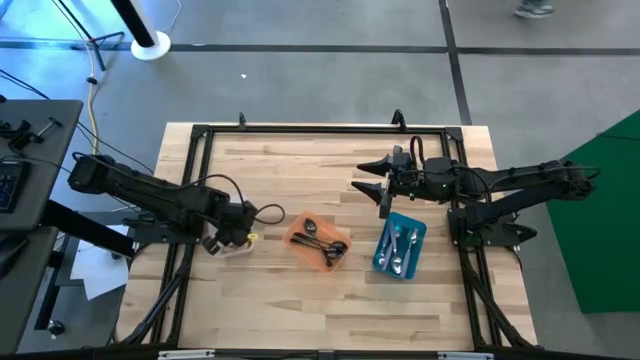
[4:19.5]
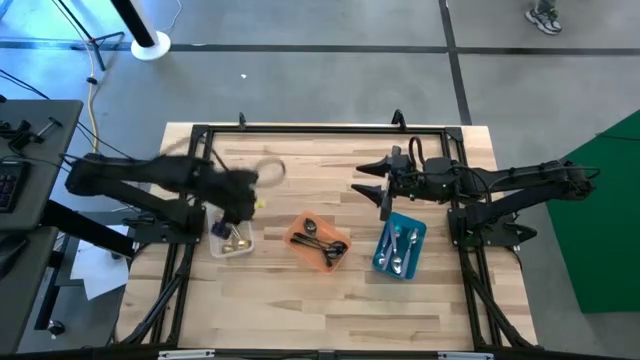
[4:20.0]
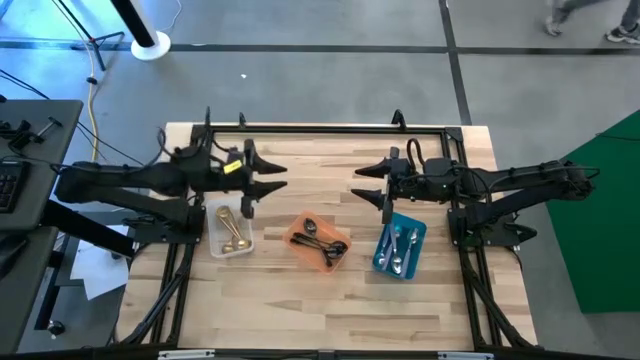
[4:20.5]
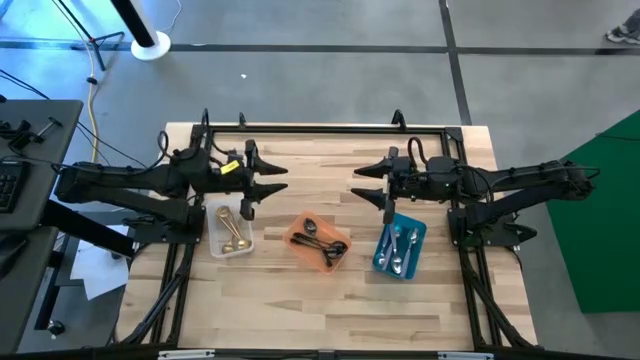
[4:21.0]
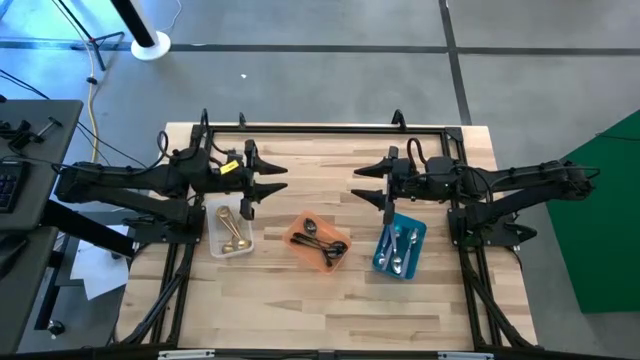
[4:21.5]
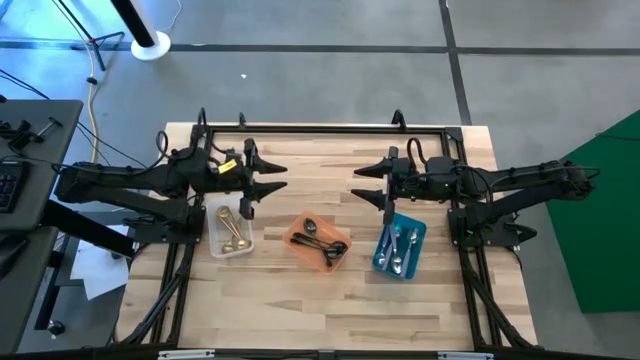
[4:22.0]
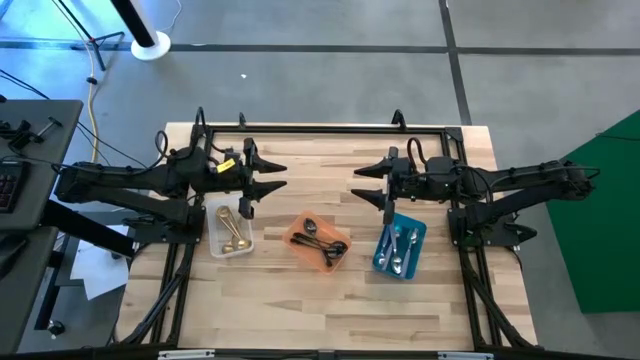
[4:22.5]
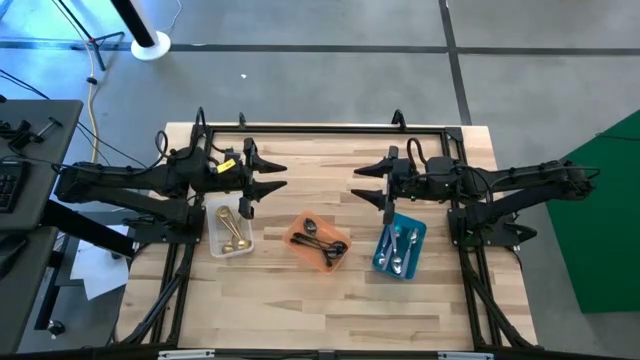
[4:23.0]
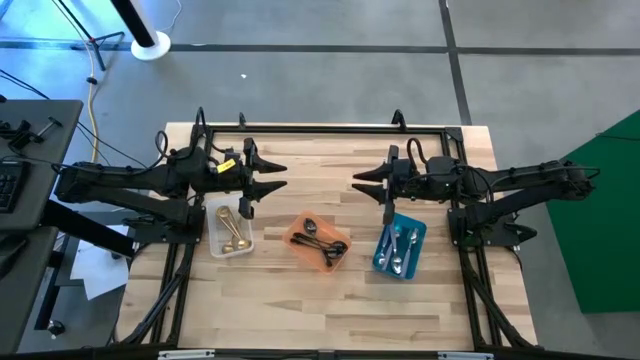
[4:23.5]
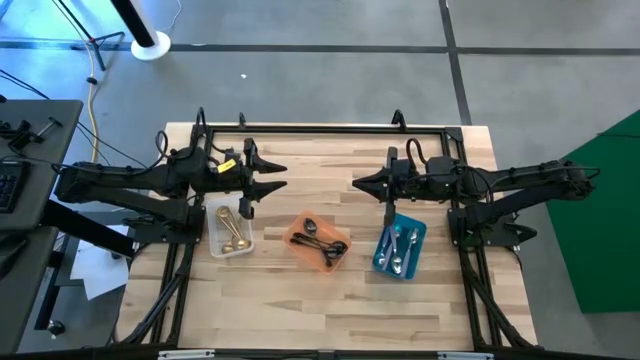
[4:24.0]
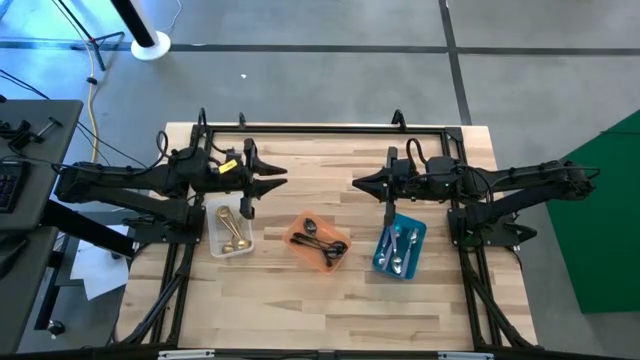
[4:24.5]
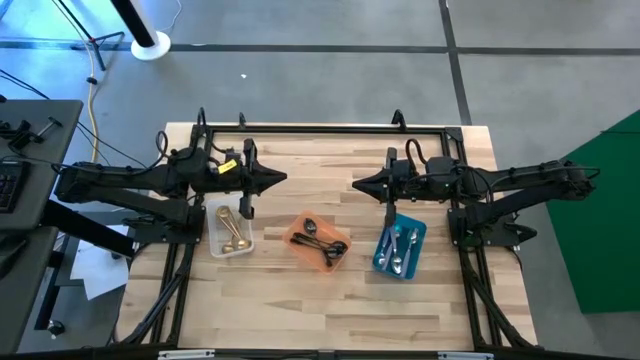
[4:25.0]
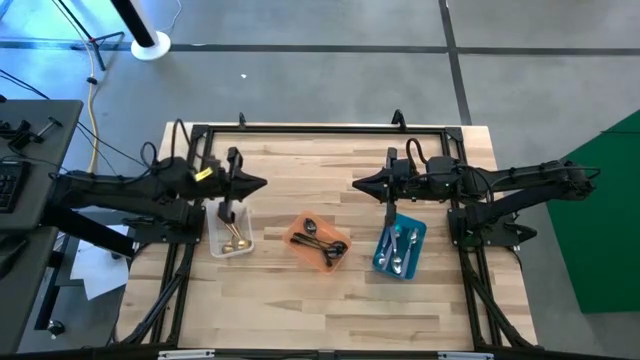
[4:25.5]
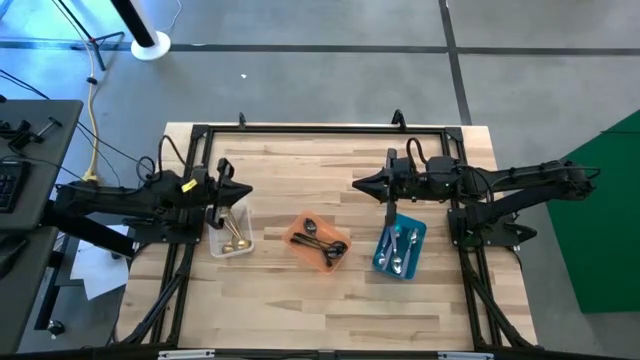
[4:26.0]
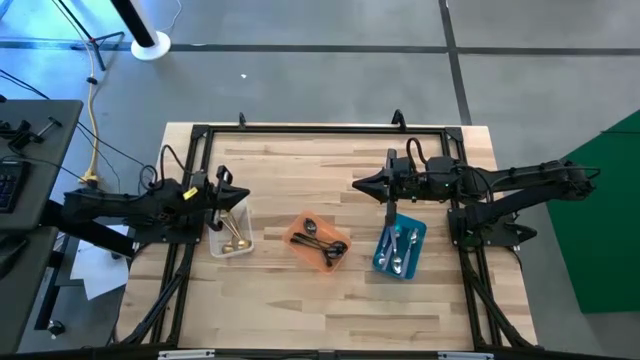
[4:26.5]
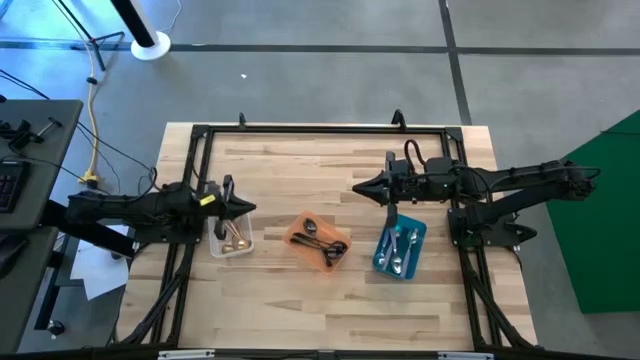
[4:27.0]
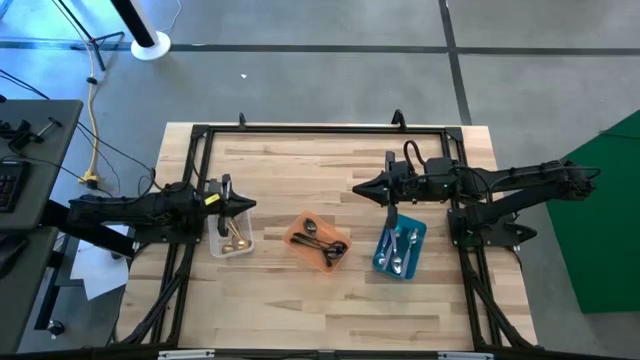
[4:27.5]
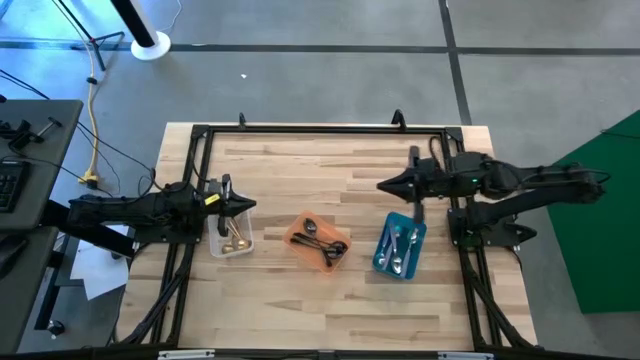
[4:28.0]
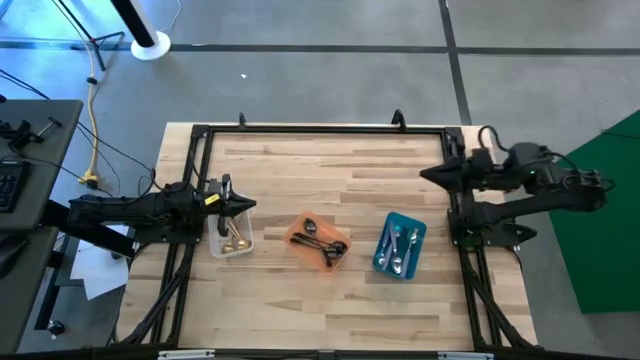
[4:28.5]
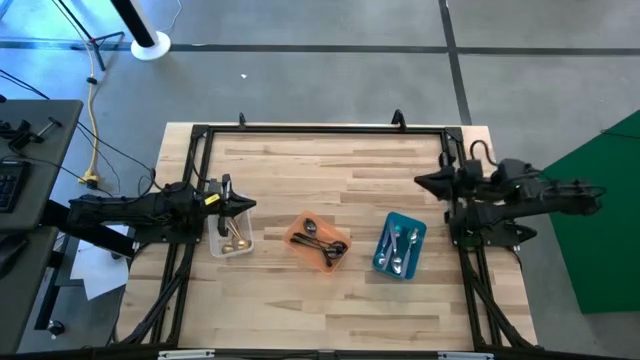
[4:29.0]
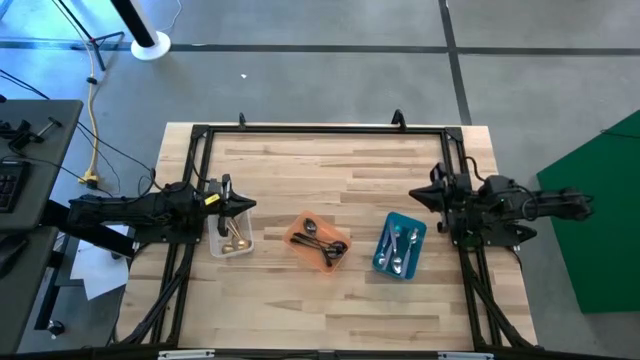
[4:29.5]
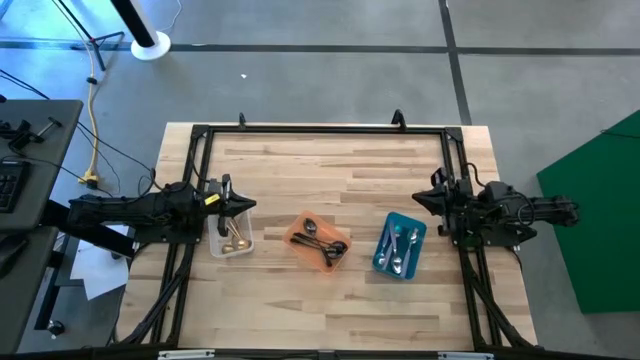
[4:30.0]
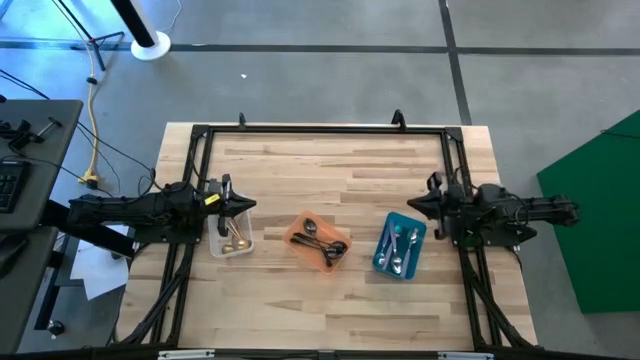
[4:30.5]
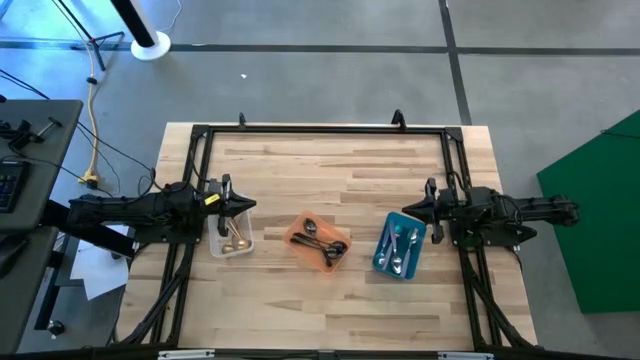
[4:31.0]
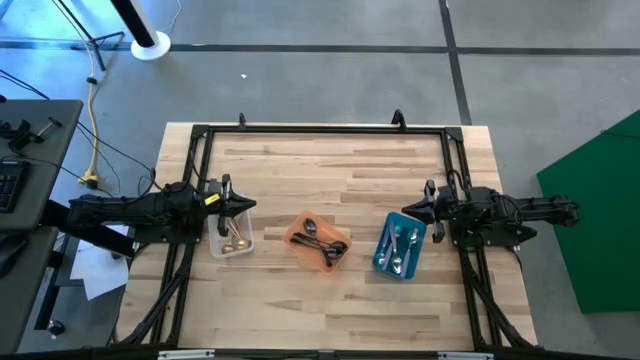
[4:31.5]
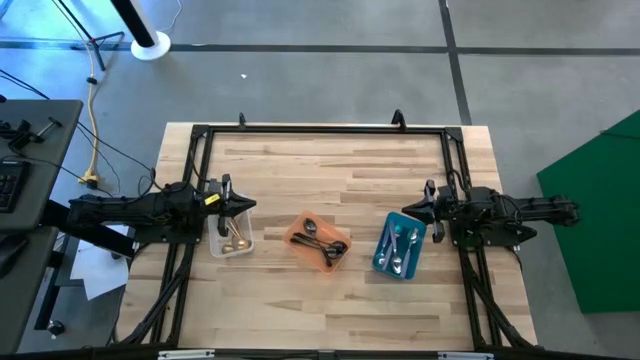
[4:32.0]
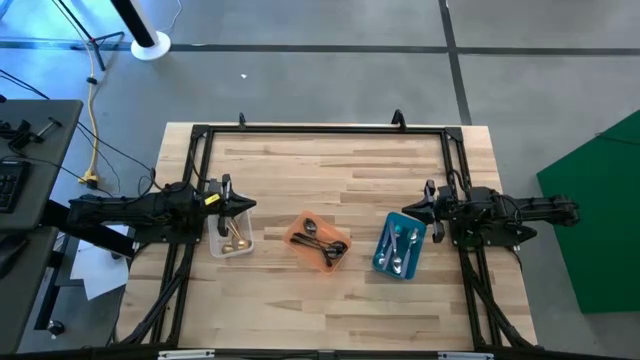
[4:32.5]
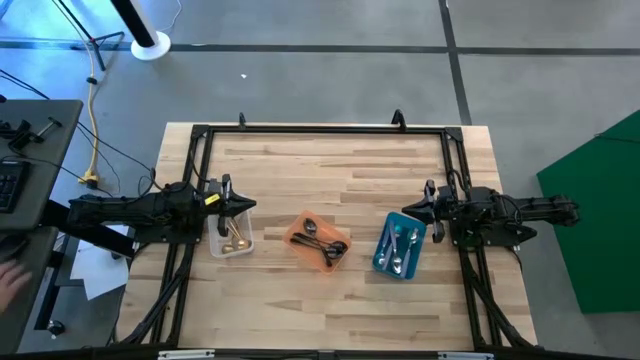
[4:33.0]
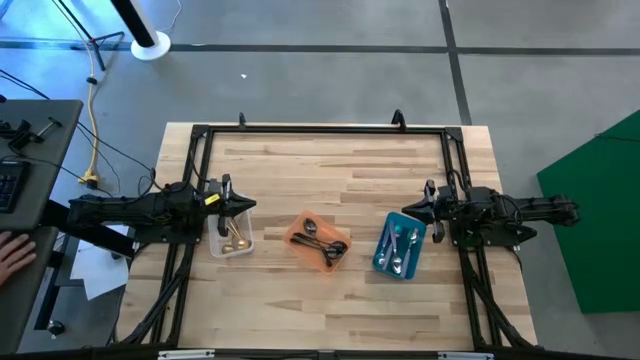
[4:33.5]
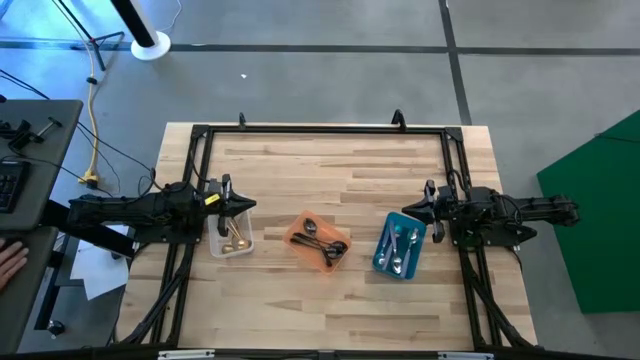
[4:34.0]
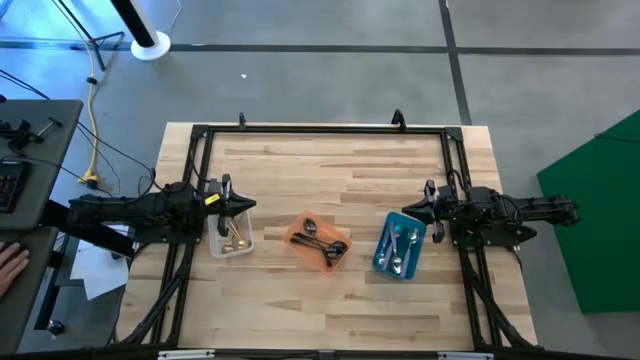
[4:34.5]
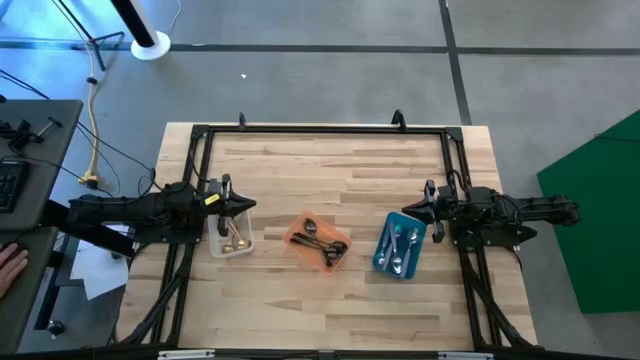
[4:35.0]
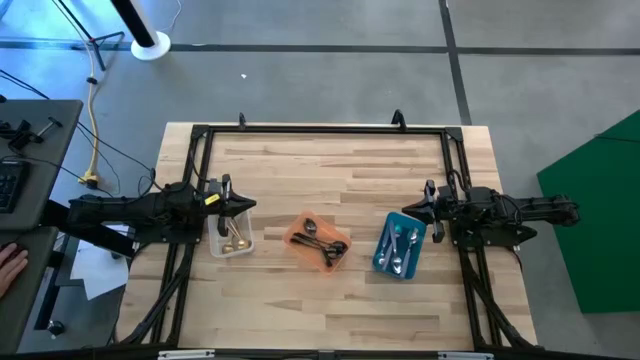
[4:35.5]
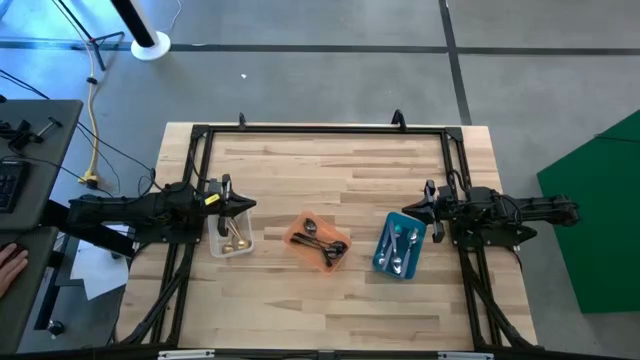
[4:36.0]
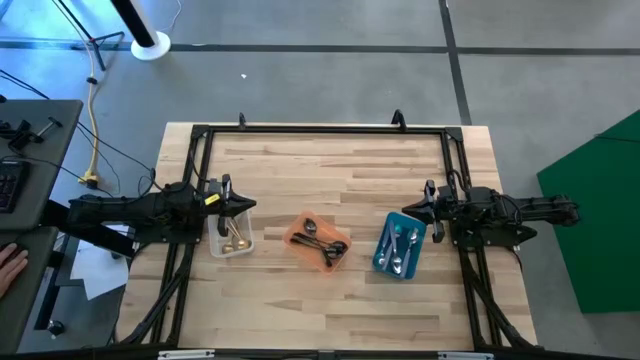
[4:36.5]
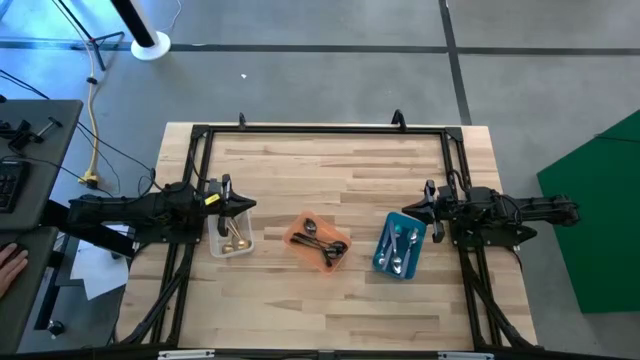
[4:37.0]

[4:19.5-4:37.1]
Task: Sort silverware by color (type)
Return to Home Position
